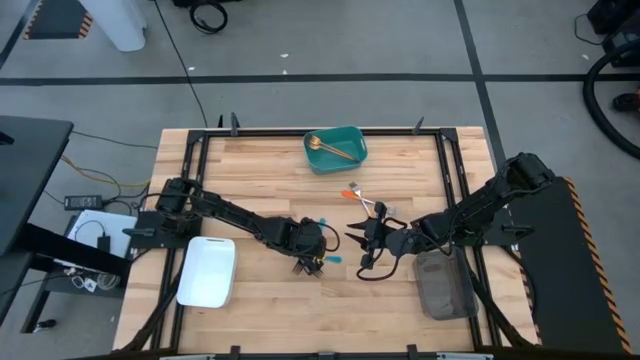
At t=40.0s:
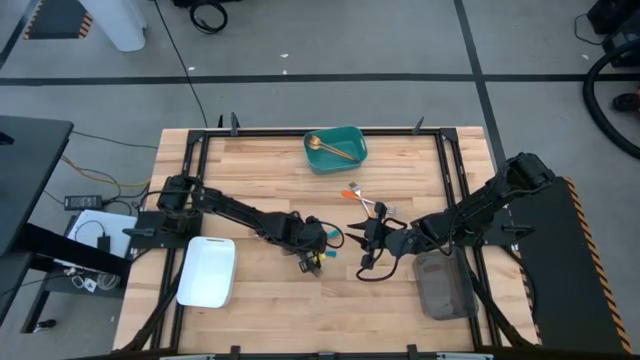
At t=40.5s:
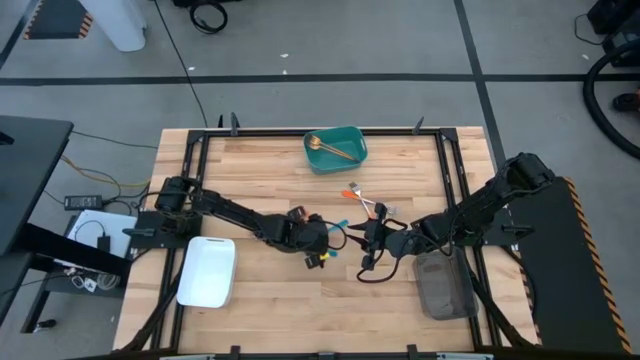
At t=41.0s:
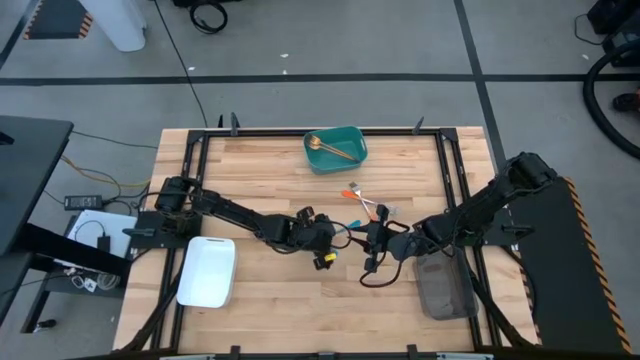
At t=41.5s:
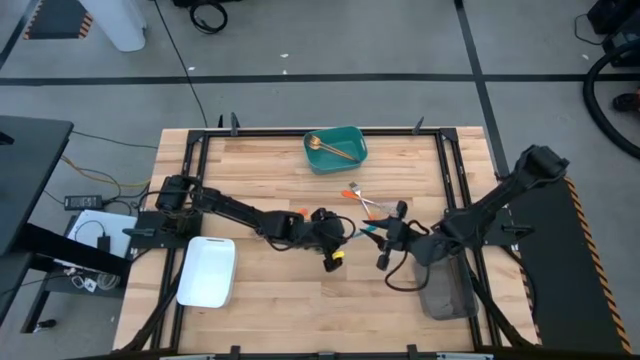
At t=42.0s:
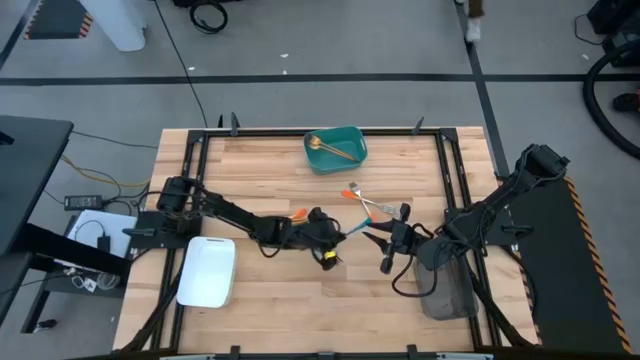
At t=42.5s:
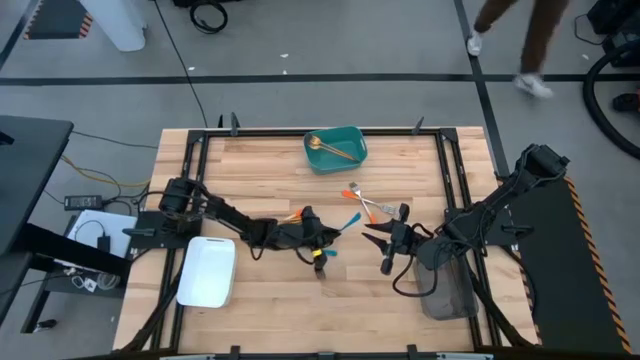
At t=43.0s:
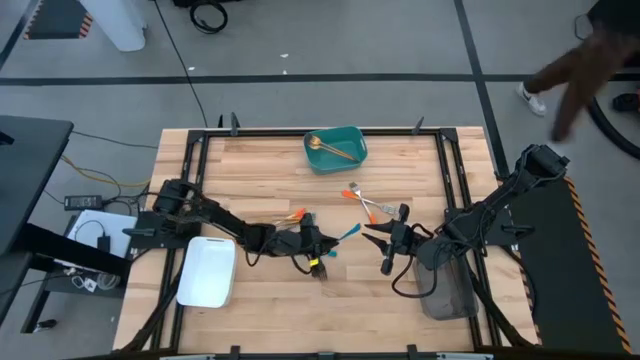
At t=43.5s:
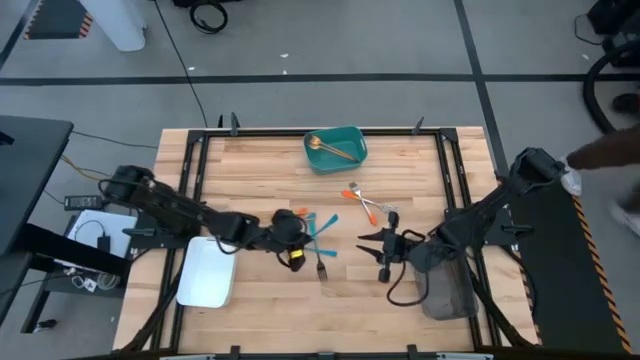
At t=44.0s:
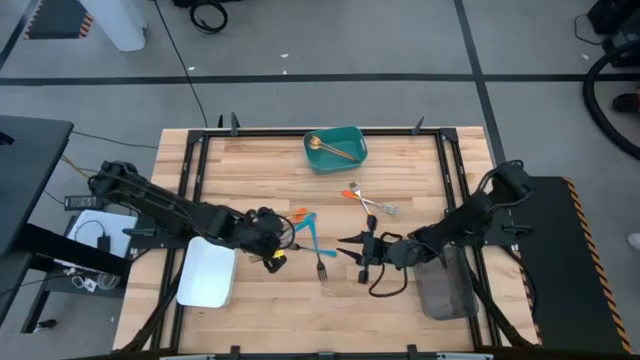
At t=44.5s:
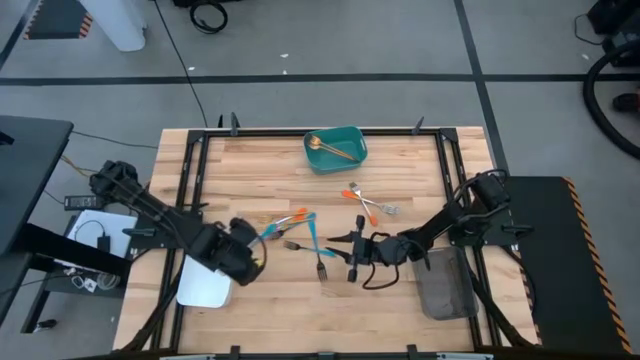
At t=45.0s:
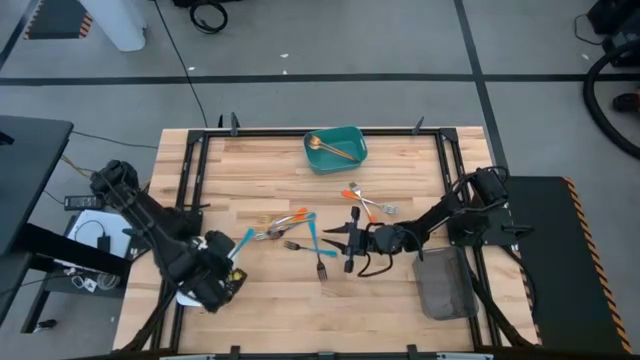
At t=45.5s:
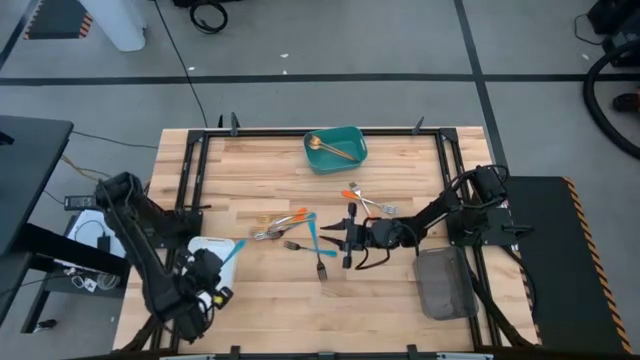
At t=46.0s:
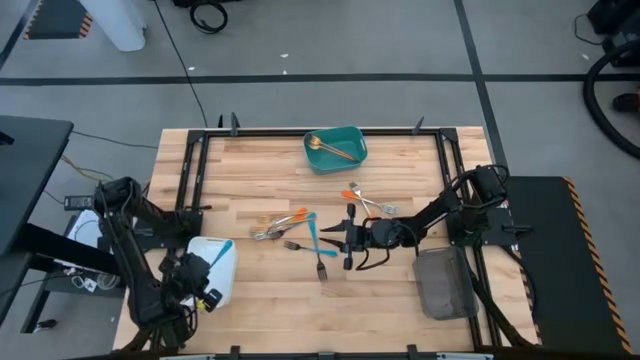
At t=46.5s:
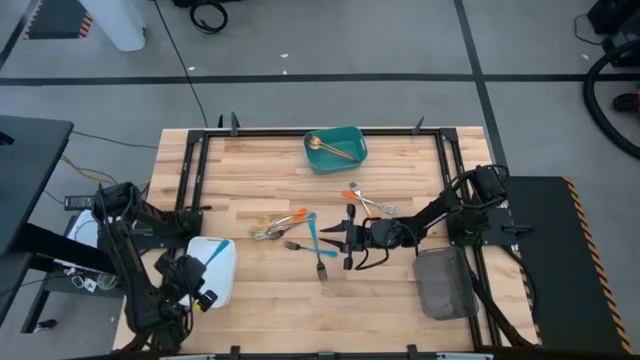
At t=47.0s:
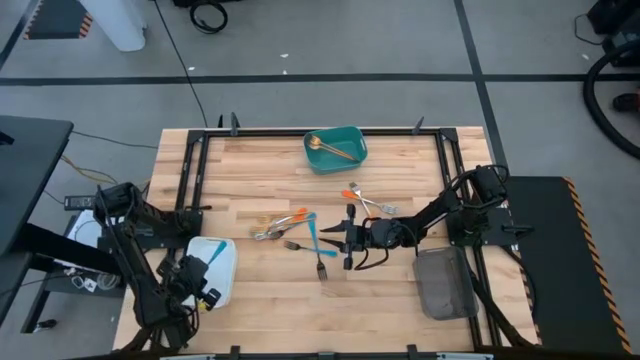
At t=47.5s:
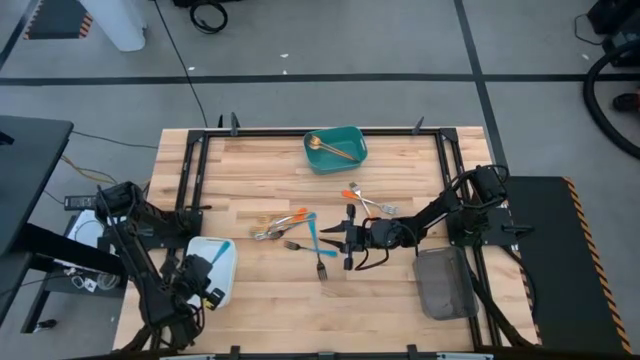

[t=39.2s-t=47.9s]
Task: Sort silverware by color (type)
Put the blue fork into the white bin

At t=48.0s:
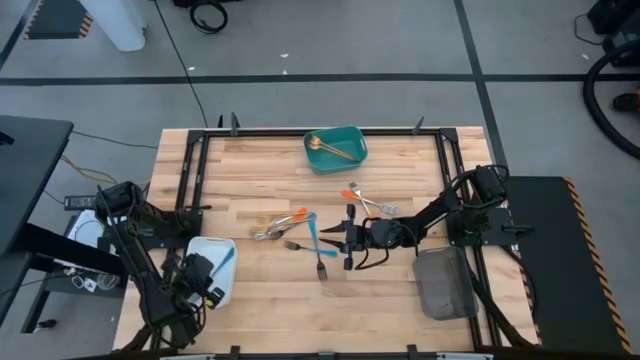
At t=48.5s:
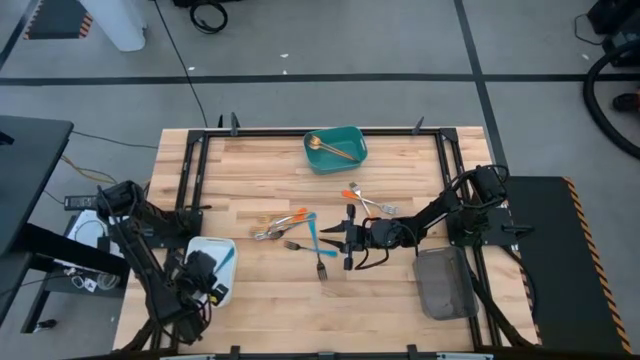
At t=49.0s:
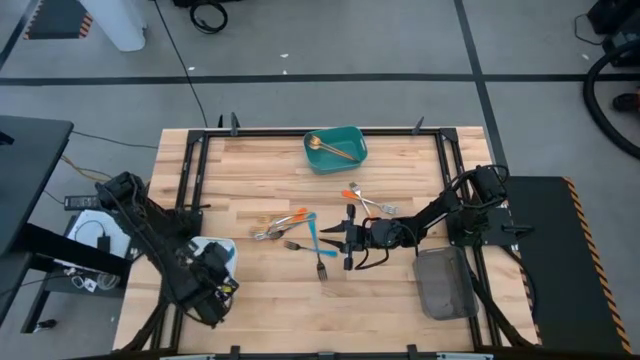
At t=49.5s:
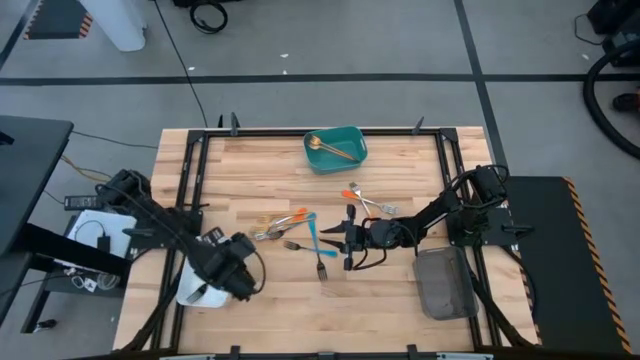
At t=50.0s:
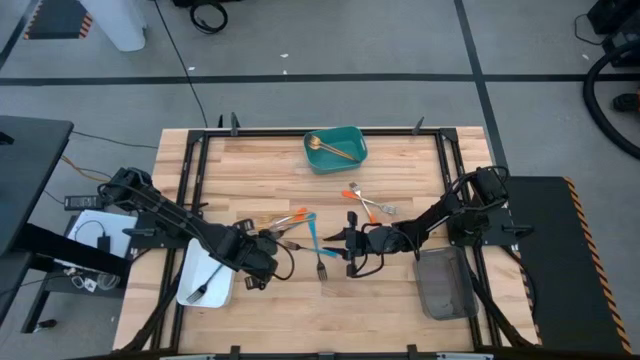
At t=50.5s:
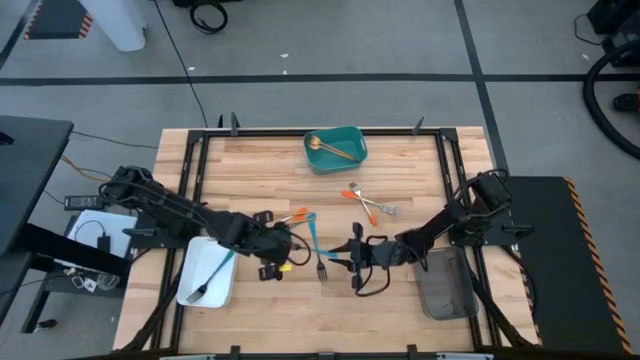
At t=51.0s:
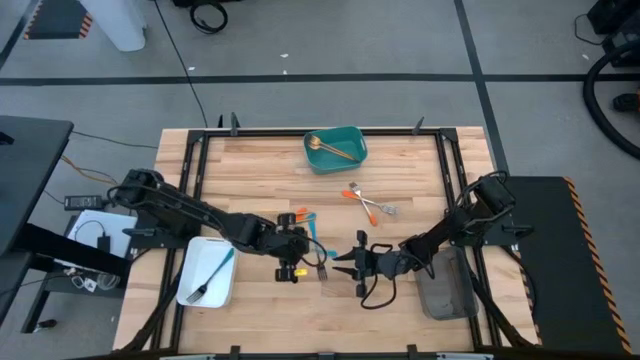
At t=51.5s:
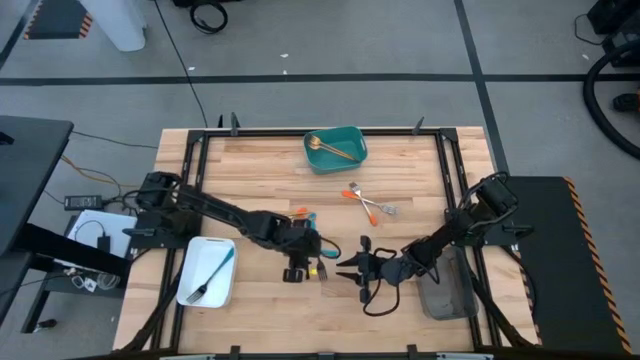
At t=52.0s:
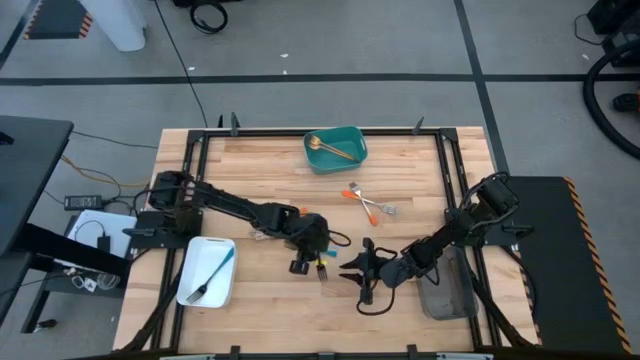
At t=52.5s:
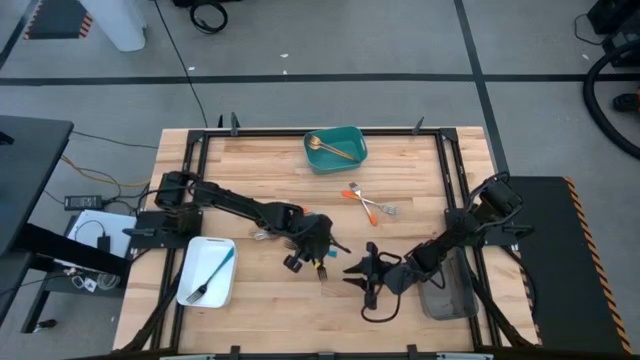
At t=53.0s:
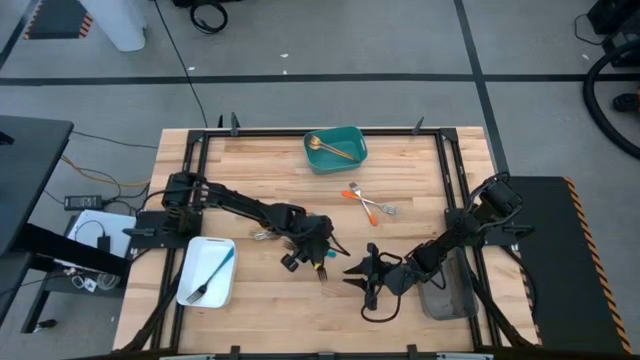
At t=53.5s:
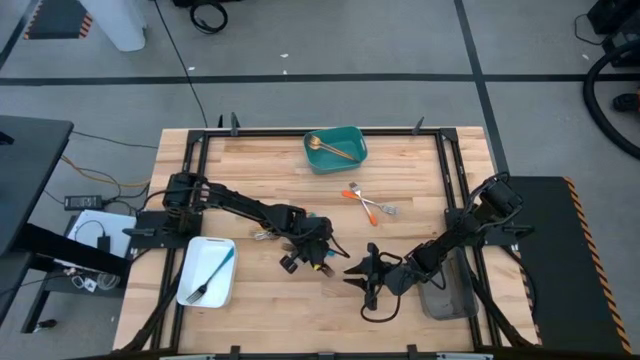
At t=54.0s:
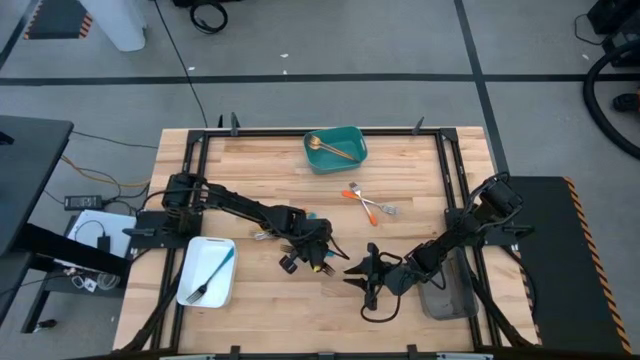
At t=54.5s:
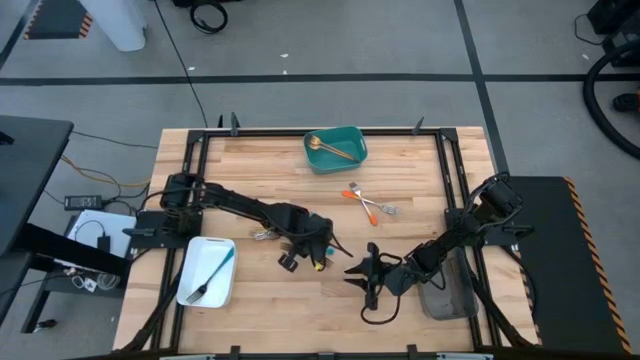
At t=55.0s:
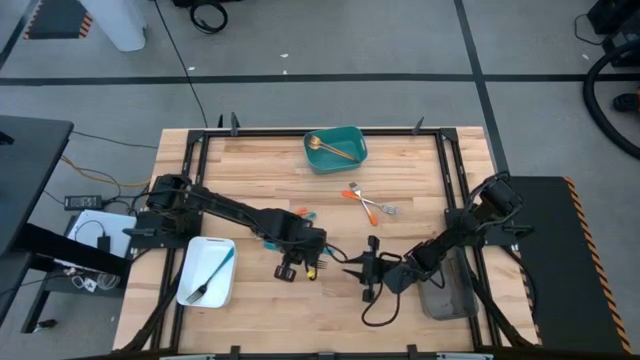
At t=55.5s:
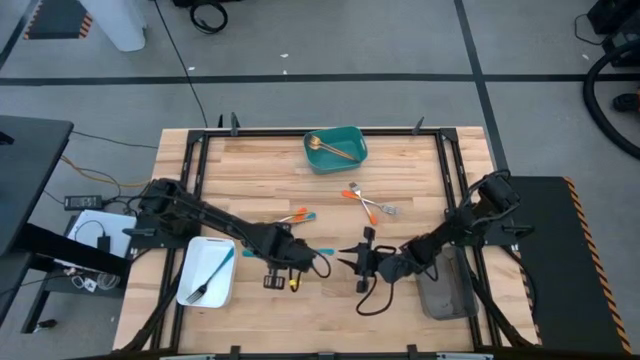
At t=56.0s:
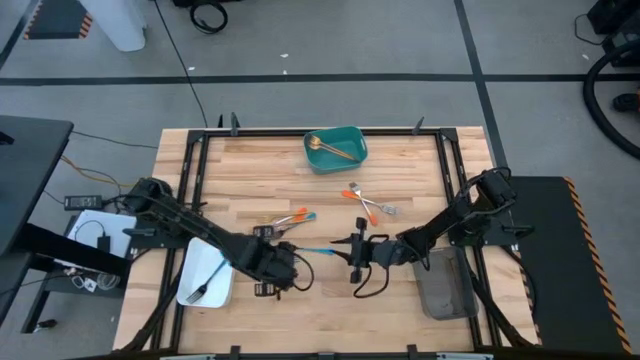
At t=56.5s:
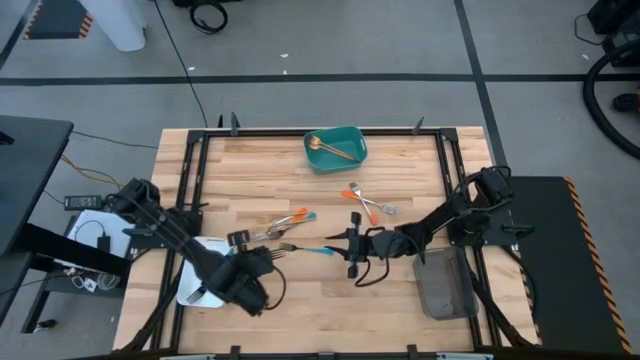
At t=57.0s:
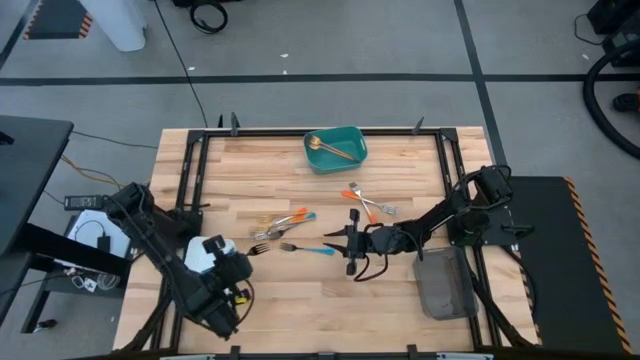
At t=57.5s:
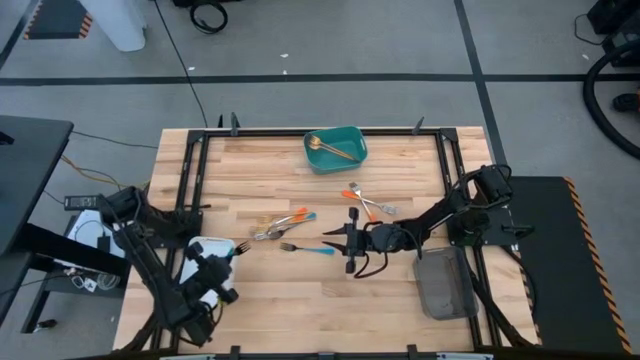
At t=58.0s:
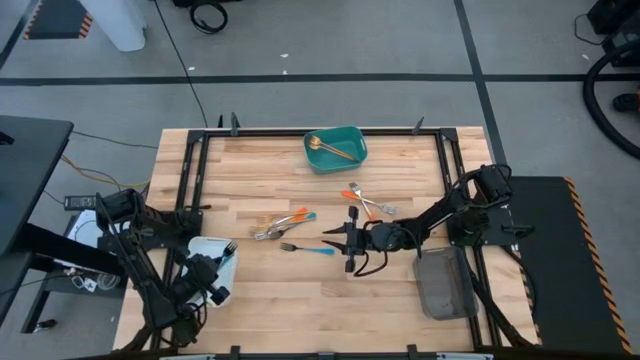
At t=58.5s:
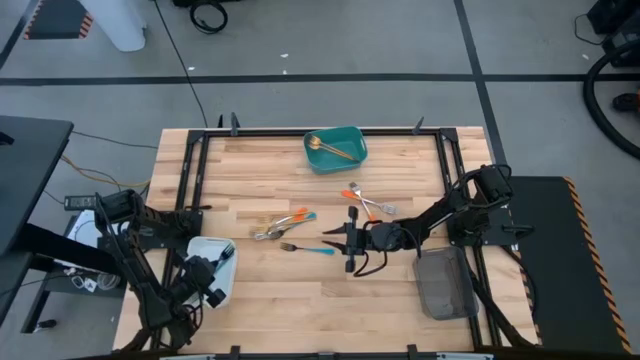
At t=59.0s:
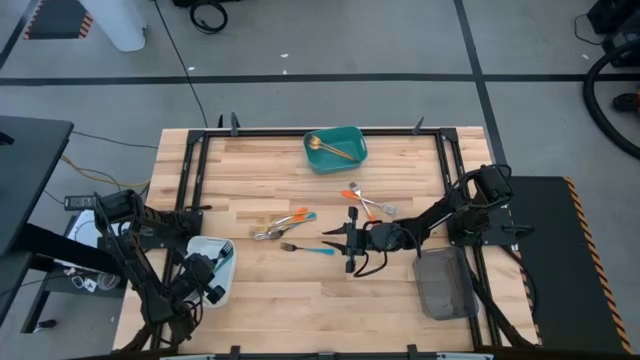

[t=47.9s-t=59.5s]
Put the blue fork into the white bin

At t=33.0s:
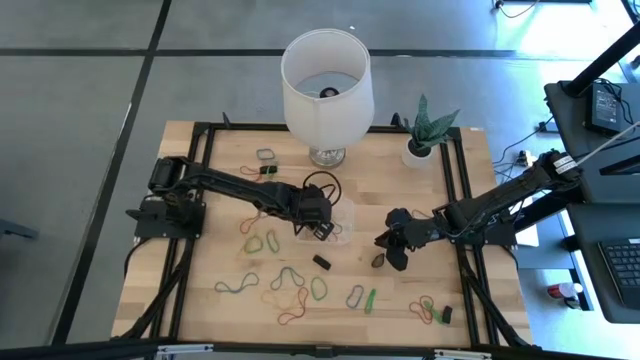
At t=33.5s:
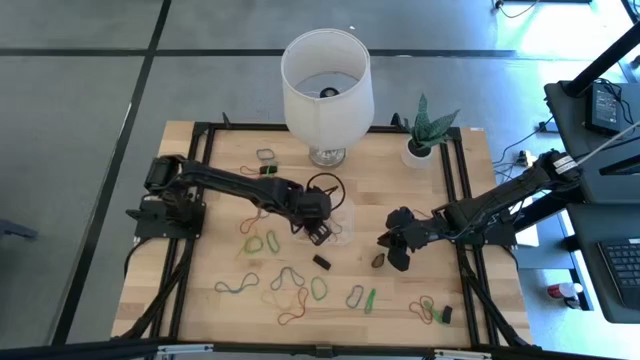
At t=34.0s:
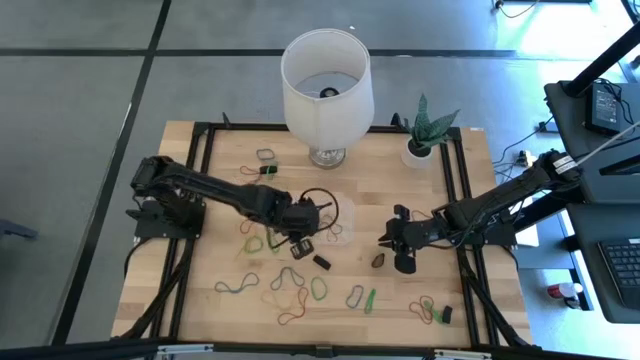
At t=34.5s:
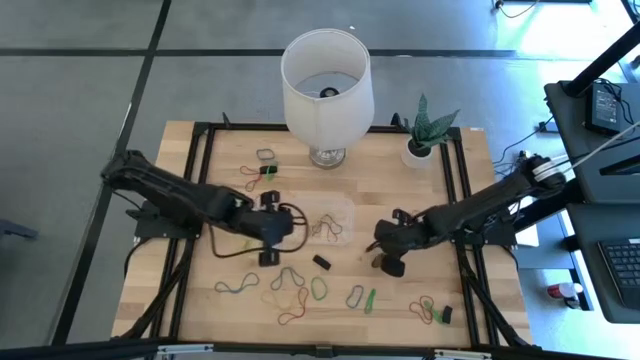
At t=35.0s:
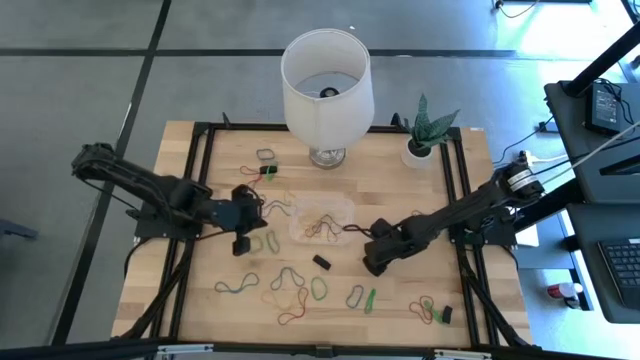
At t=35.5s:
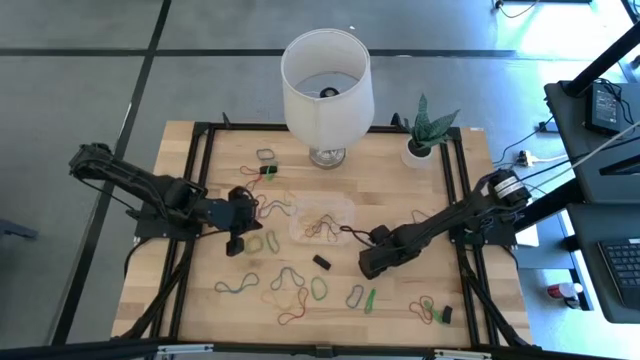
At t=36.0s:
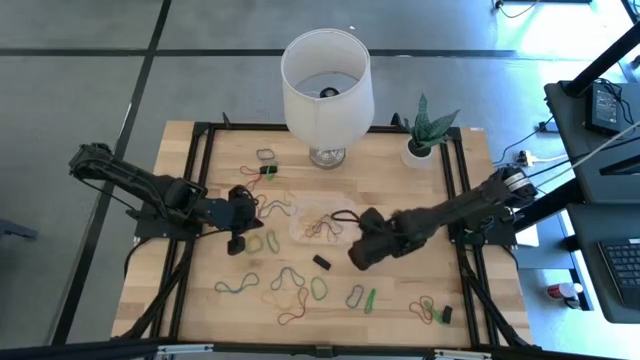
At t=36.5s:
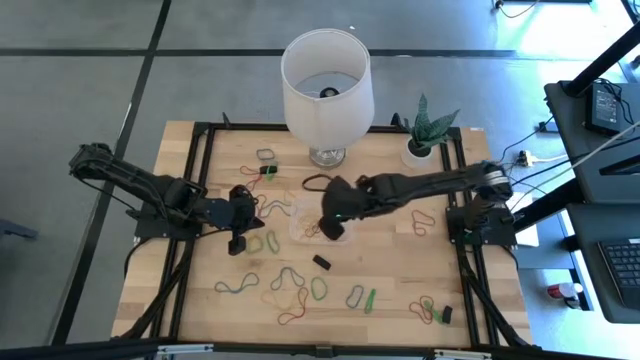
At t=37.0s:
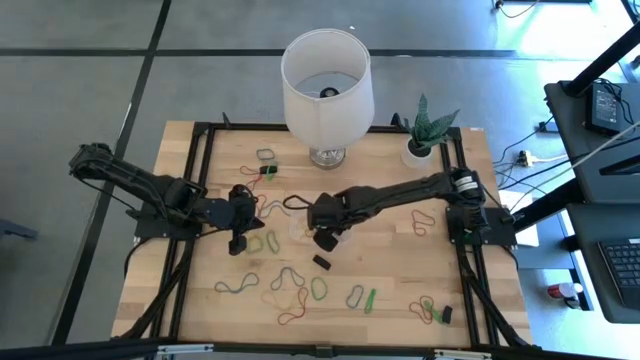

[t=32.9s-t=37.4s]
Task: Pick and place rubber bands into bin
Put the black rubber band into the container
